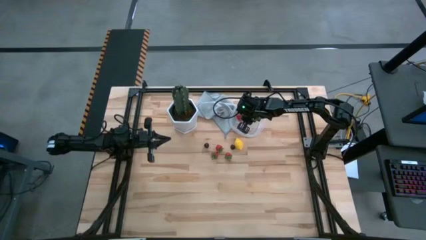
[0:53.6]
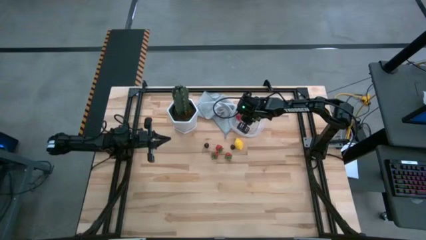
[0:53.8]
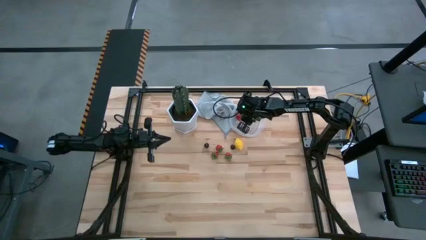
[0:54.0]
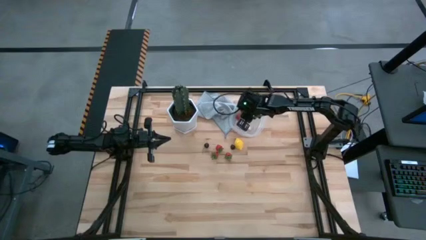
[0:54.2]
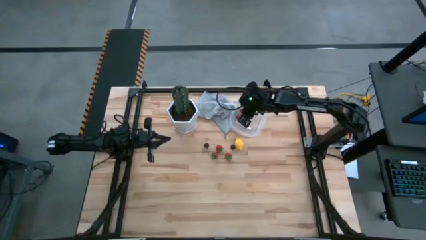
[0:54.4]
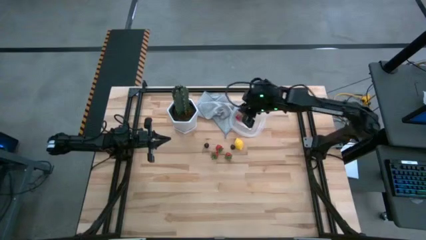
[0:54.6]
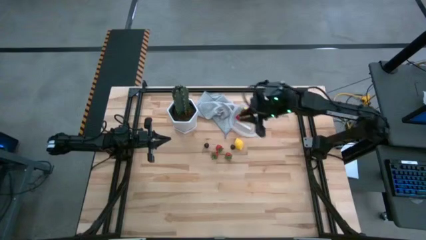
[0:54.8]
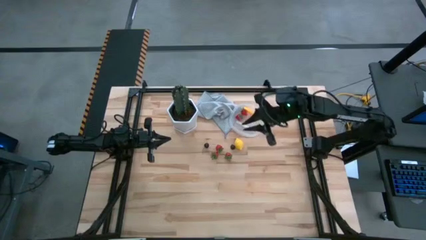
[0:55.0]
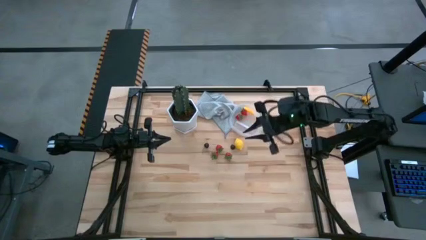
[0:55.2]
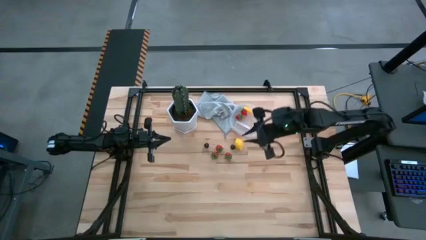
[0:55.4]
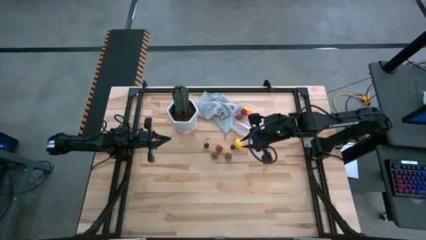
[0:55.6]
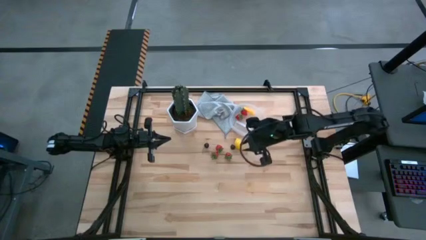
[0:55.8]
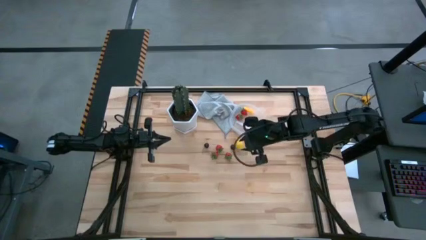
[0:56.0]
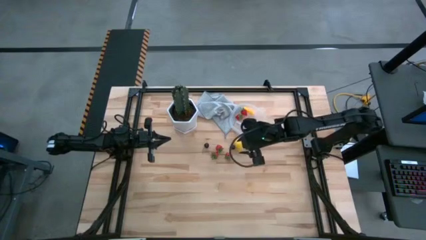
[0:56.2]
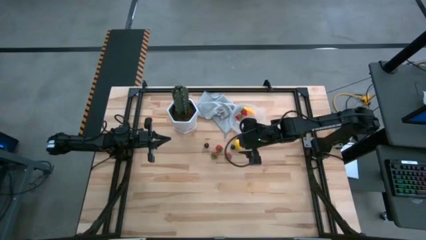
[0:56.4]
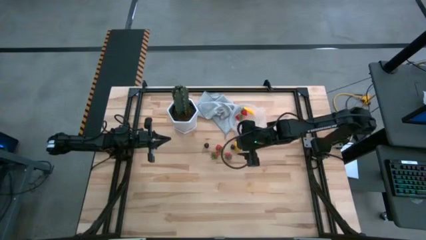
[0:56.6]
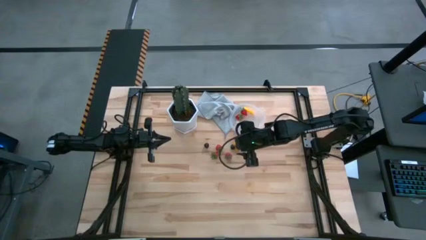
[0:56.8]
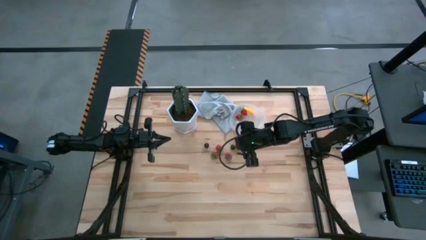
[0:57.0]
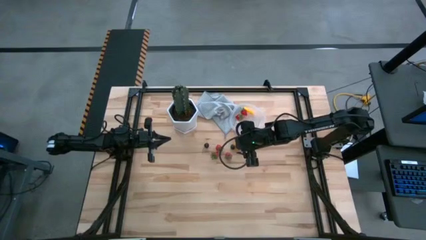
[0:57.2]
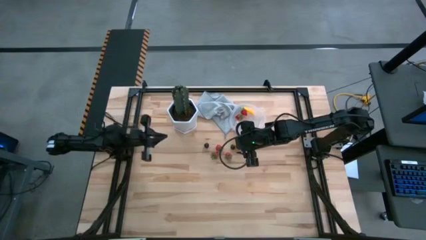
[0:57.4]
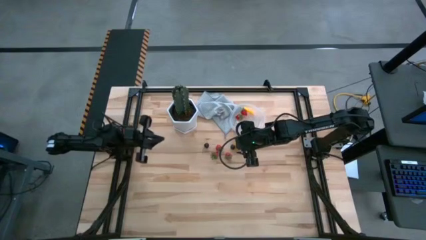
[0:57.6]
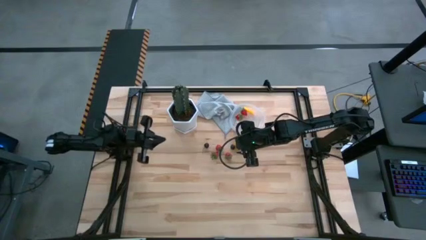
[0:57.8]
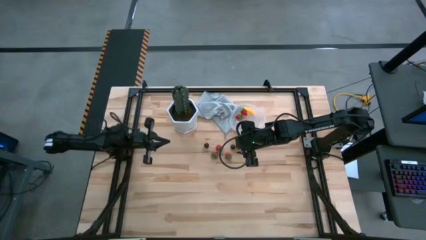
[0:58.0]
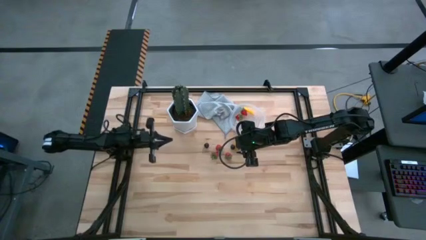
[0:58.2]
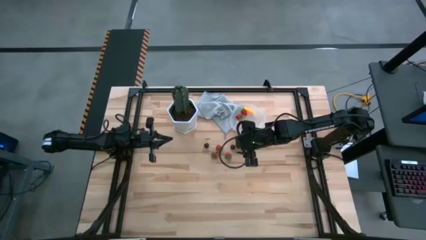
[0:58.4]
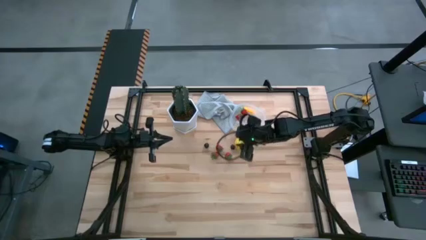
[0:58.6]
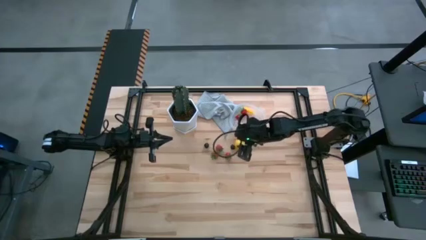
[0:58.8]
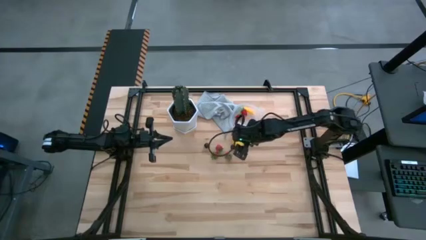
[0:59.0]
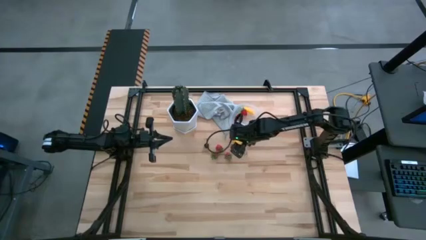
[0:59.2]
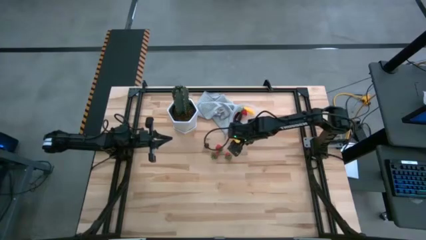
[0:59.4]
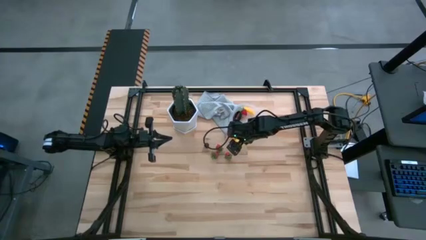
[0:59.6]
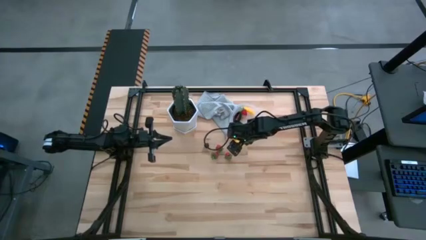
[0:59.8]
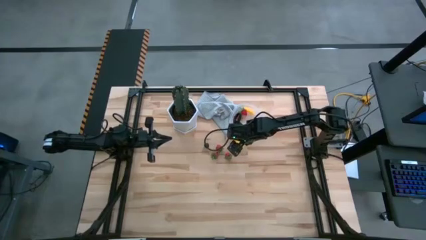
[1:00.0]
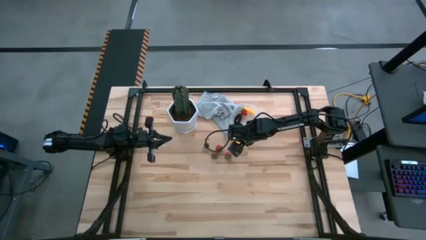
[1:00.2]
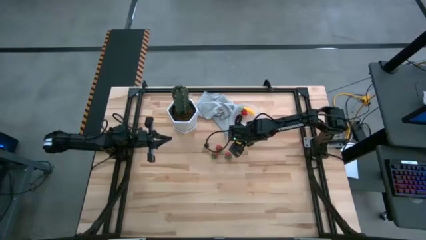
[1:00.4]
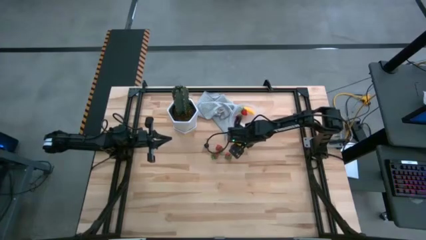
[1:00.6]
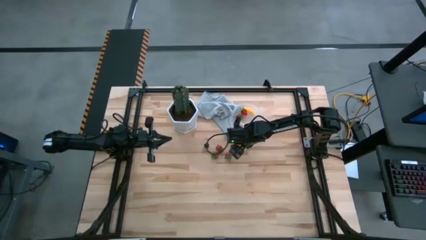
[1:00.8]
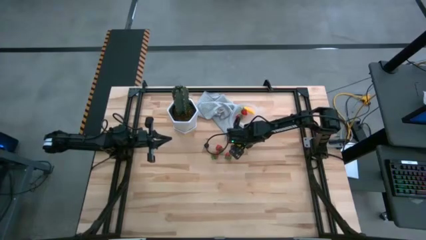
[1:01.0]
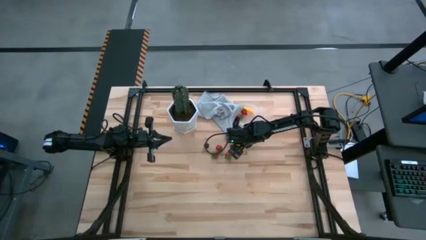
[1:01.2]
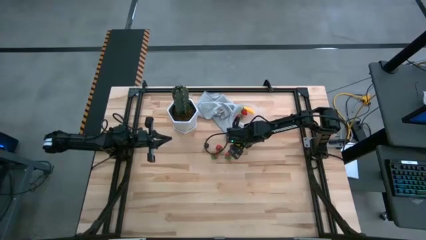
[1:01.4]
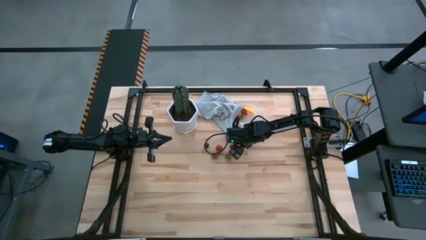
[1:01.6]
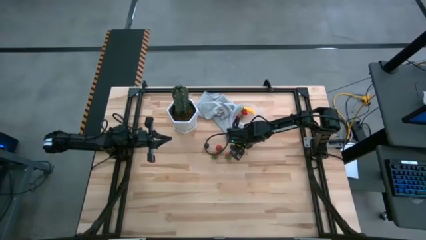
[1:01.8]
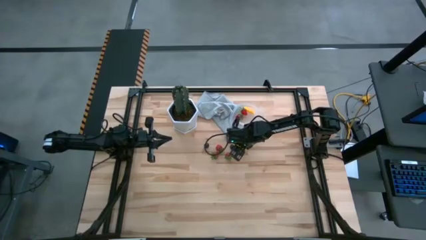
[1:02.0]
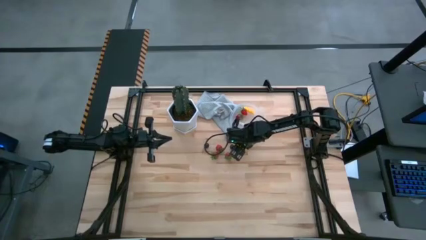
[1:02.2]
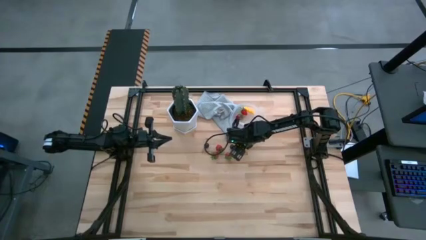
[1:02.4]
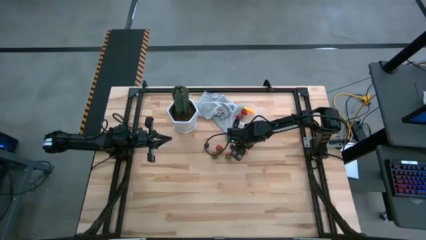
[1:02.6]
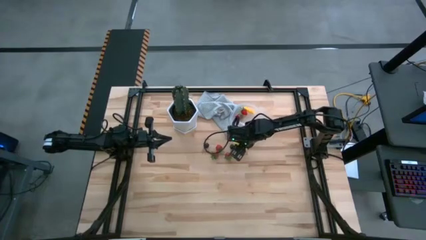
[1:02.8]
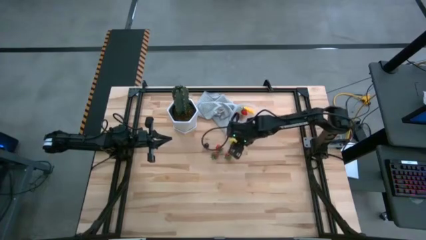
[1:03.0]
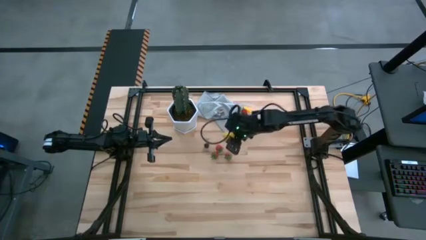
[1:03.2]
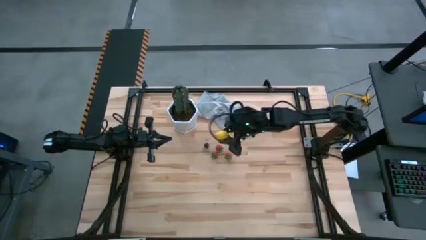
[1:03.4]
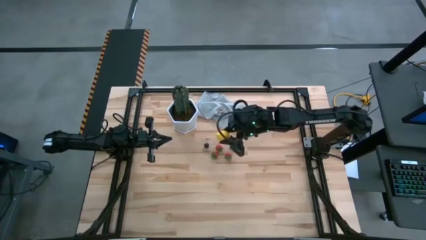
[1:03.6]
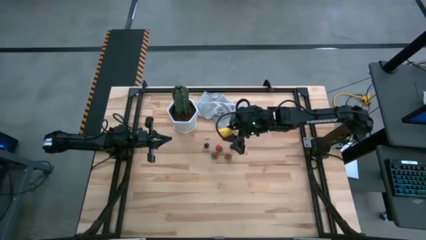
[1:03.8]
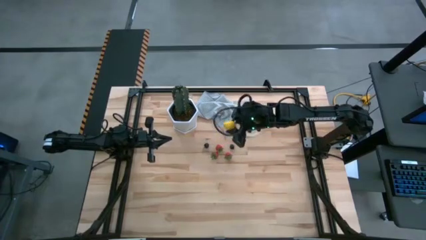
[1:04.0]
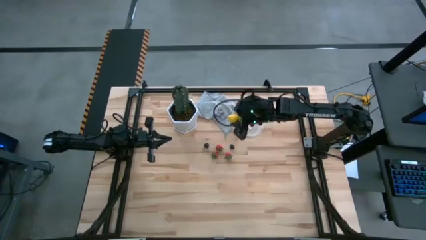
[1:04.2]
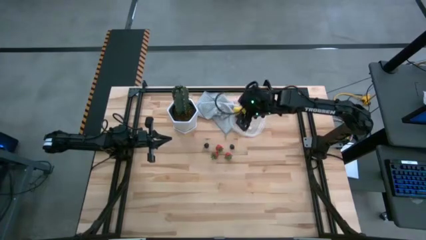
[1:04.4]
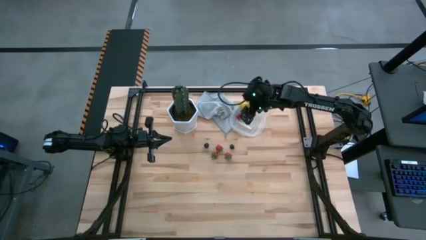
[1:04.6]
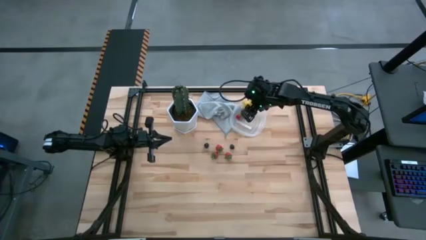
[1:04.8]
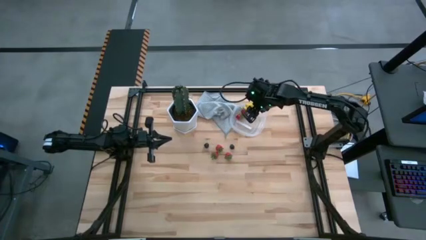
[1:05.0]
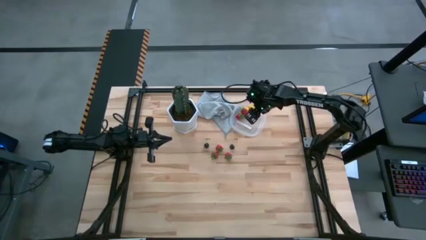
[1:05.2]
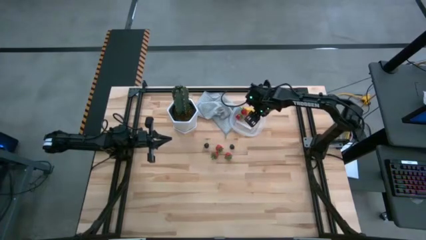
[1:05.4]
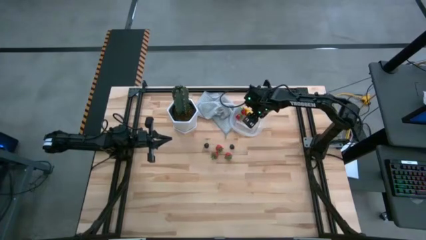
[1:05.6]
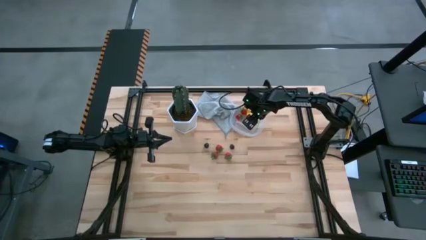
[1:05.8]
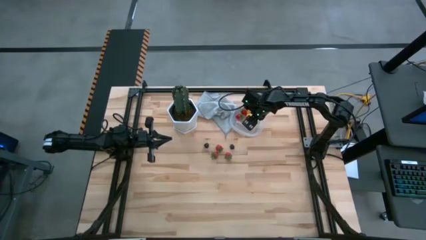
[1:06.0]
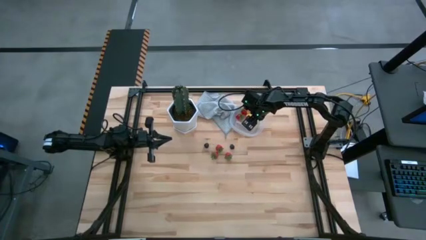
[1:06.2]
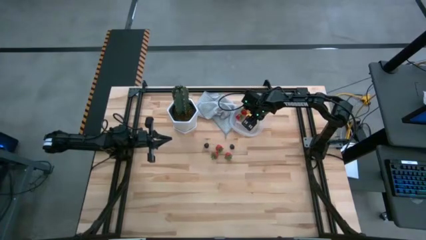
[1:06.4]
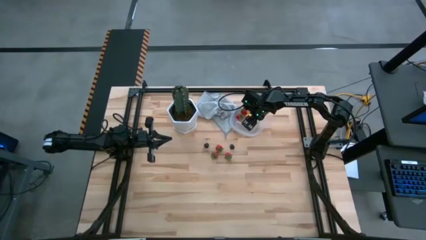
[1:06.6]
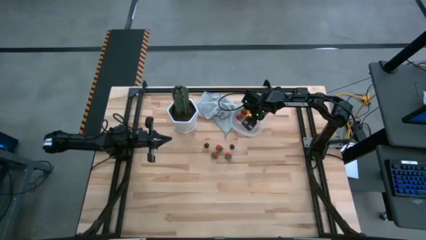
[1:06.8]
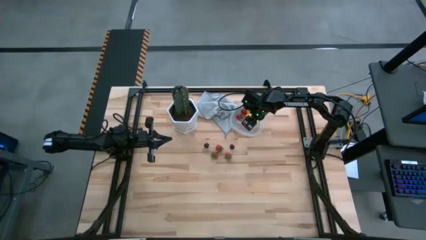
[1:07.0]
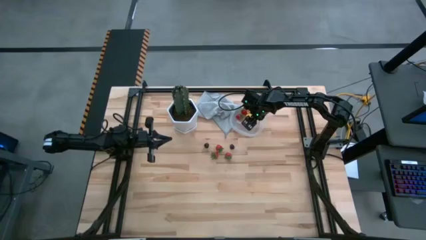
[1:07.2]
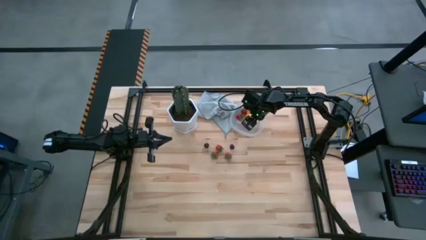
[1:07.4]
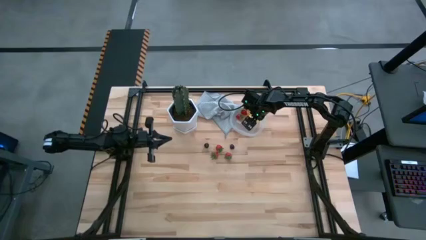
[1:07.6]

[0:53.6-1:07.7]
Task: Pick and placing Produce into tupperware
Put the lemon into the transparent bin

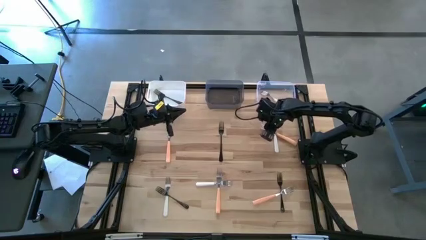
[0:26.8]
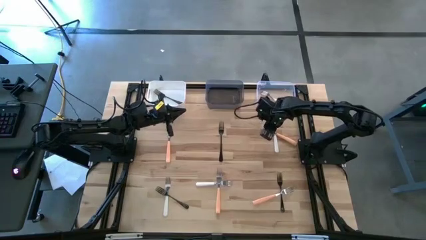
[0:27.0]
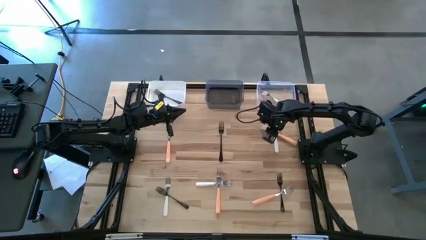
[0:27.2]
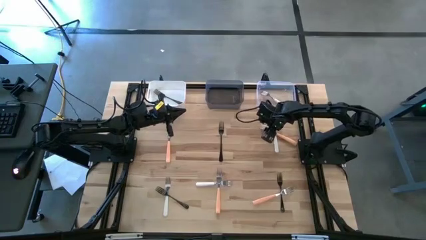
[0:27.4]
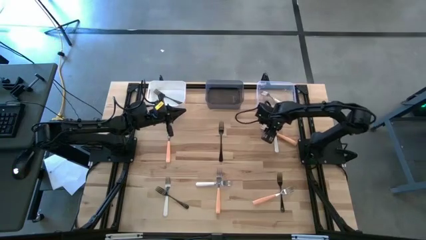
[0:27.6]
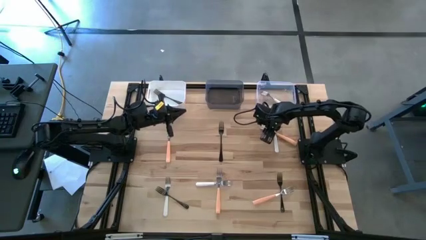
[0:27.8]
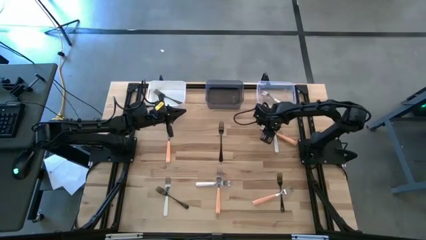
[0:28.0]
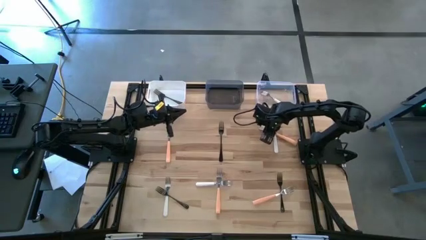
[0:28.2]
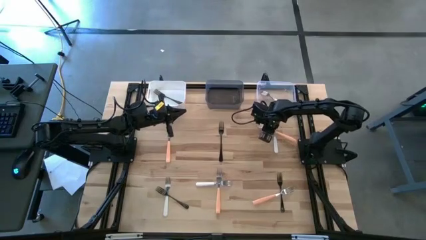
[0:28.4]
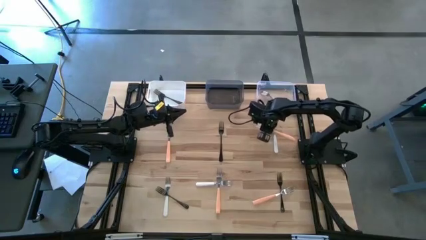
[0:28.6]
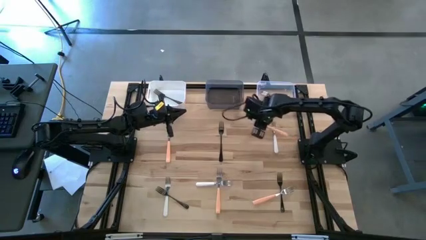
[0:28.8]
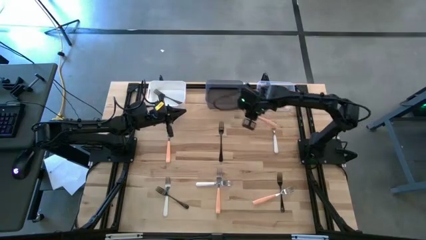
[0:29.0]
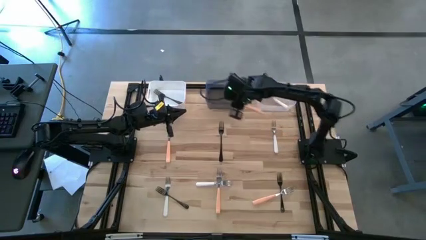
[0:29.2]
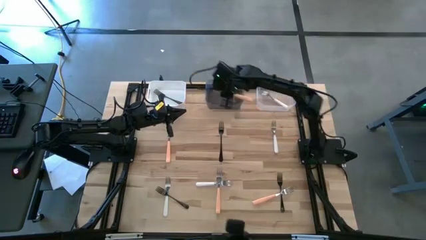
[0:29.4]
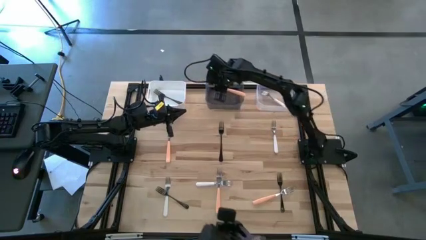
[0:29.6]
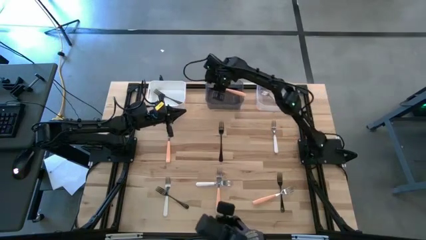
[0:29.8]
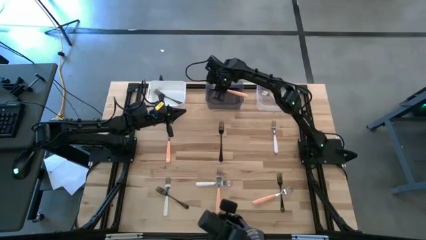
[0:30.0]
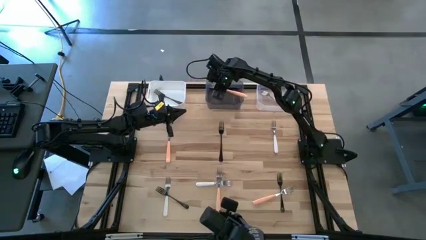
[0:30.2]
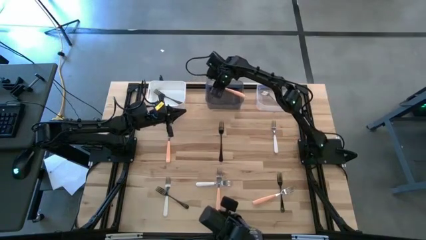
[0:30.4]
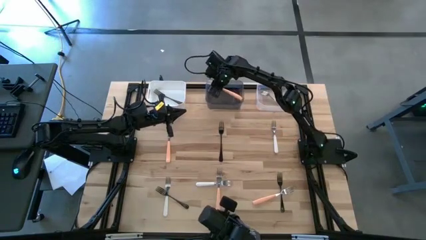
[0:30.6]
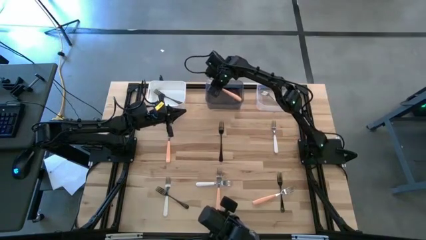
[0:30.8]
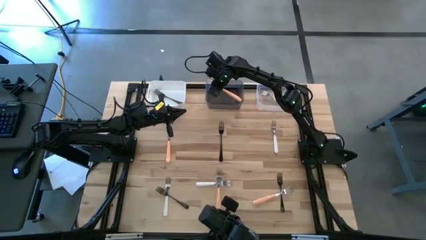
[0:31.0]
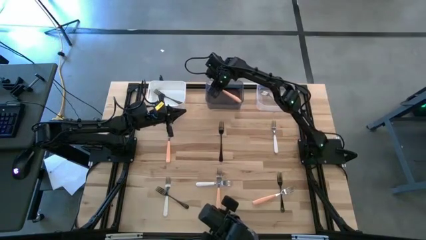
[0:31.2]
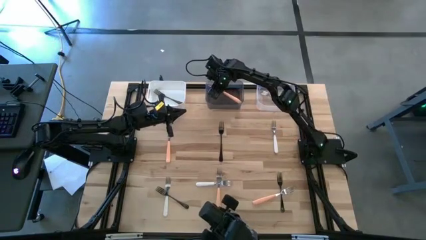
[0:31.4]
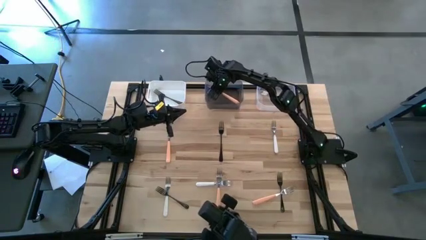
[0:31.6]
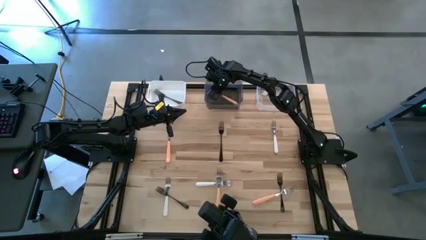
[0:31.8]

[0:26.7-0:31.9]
Task: Sort silverware by color (type)
Put the top right orange fork into the black bin
